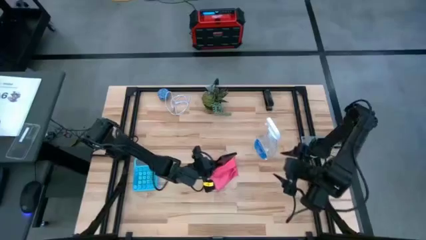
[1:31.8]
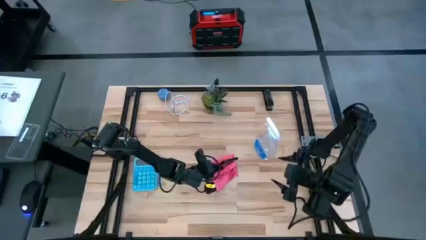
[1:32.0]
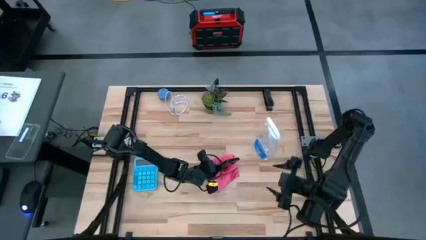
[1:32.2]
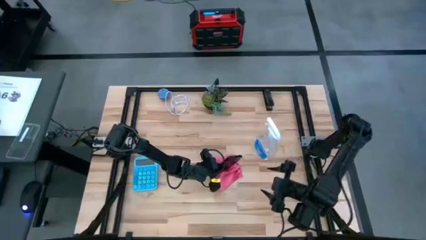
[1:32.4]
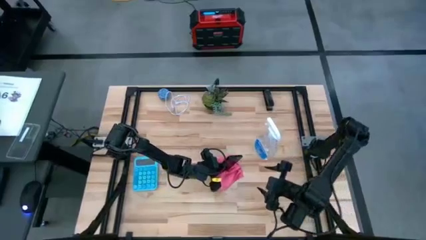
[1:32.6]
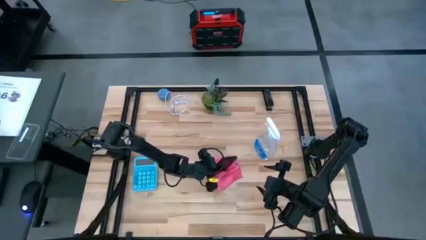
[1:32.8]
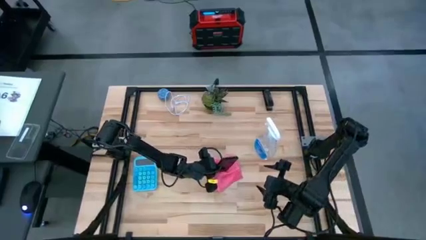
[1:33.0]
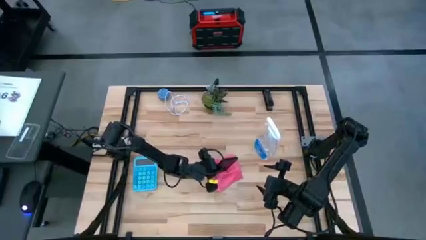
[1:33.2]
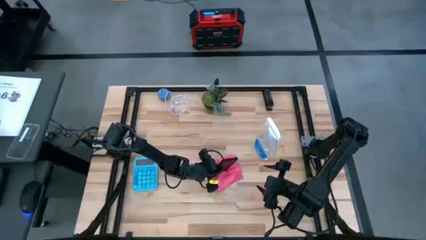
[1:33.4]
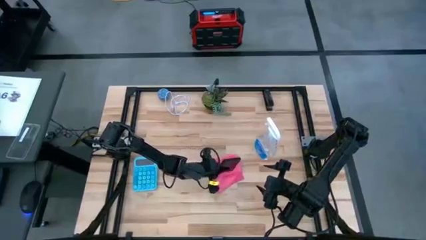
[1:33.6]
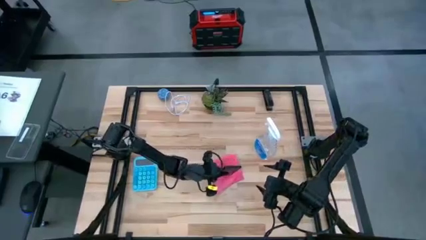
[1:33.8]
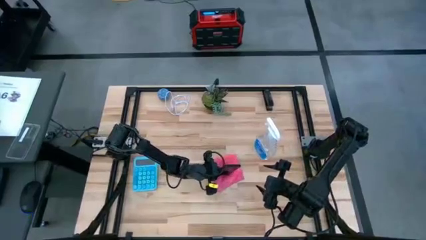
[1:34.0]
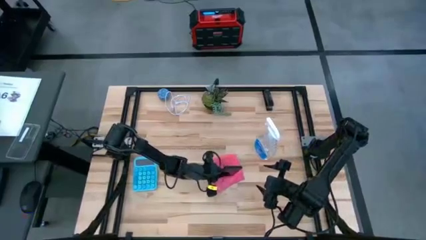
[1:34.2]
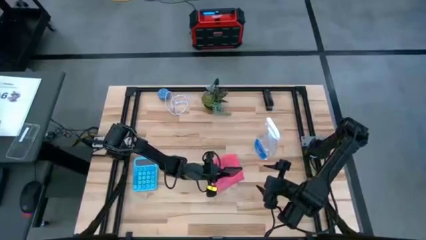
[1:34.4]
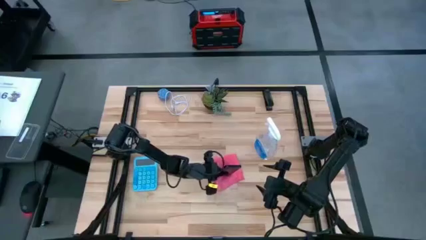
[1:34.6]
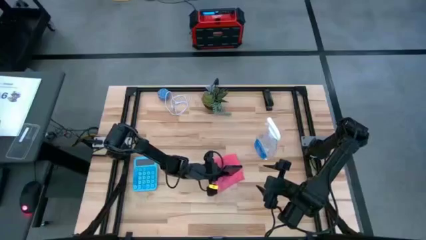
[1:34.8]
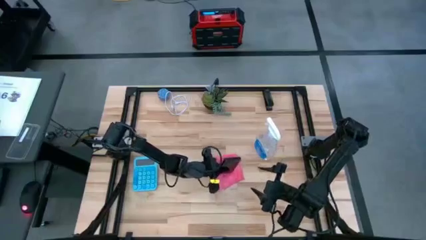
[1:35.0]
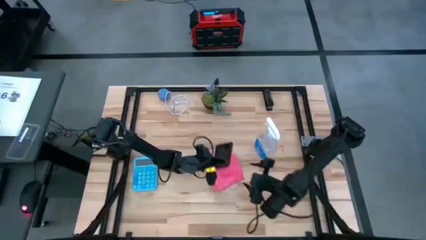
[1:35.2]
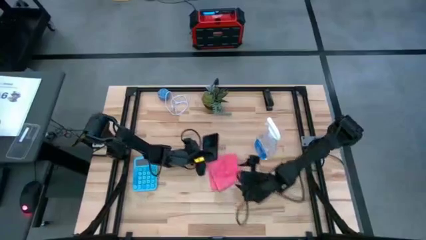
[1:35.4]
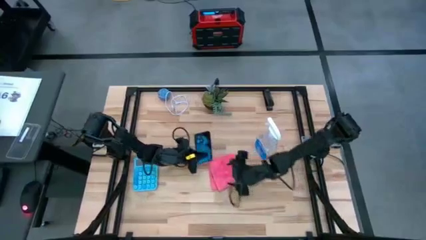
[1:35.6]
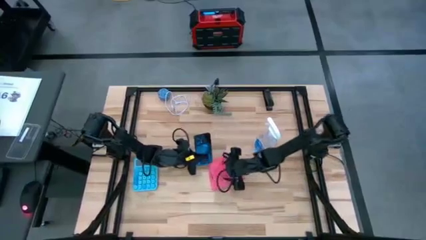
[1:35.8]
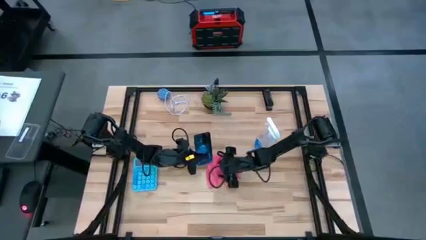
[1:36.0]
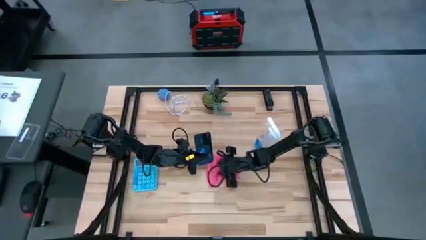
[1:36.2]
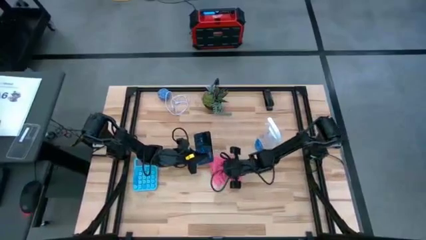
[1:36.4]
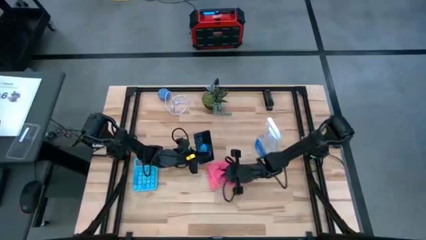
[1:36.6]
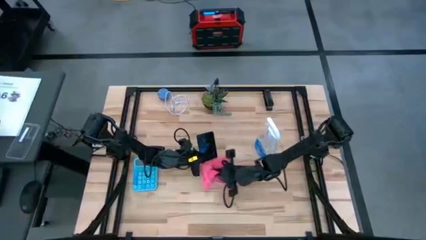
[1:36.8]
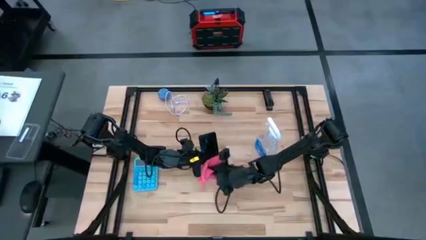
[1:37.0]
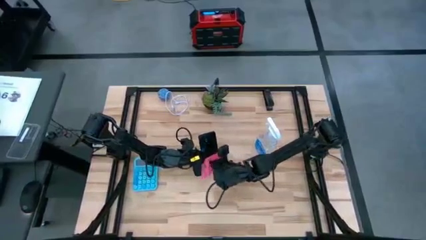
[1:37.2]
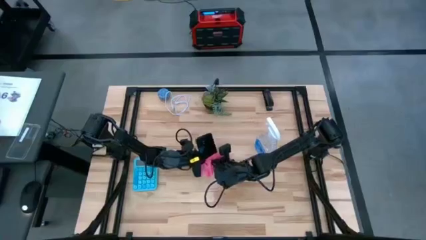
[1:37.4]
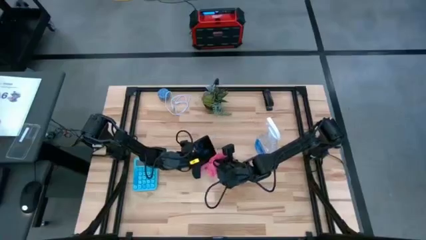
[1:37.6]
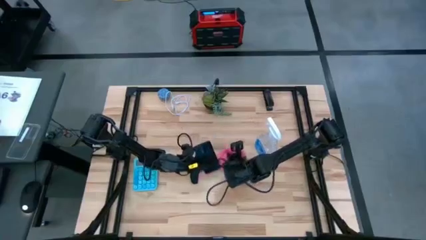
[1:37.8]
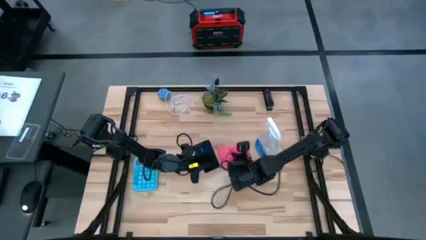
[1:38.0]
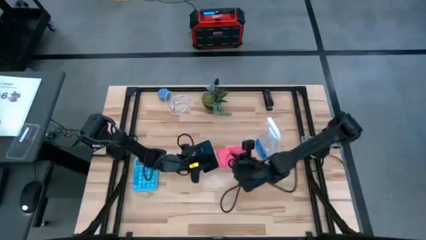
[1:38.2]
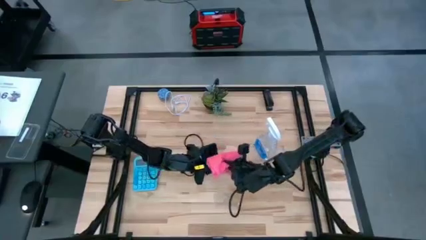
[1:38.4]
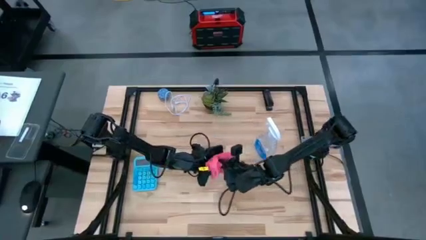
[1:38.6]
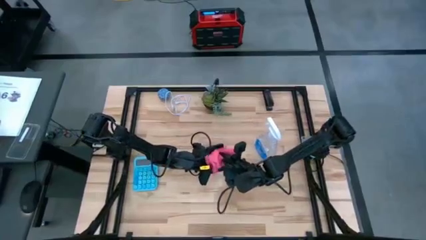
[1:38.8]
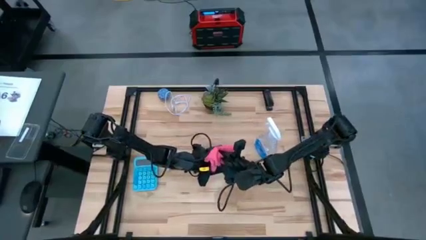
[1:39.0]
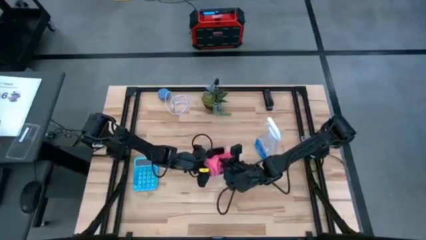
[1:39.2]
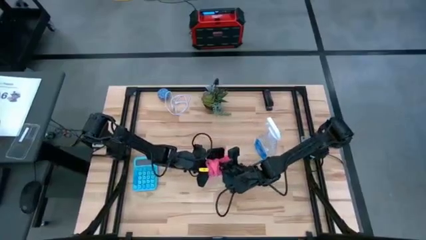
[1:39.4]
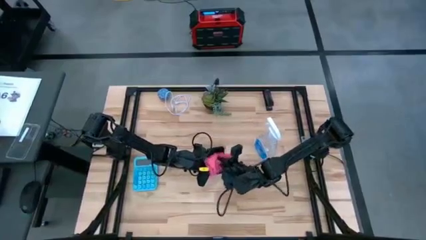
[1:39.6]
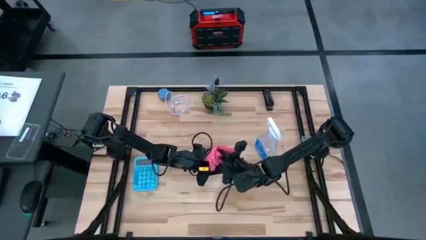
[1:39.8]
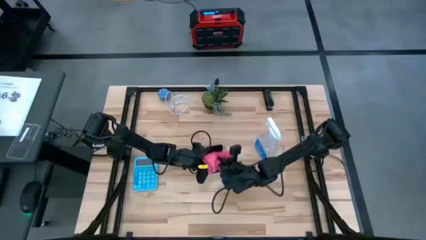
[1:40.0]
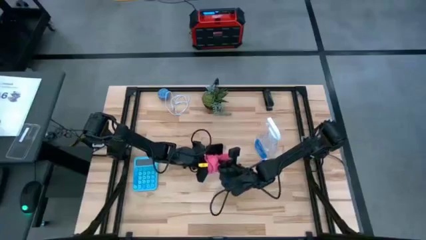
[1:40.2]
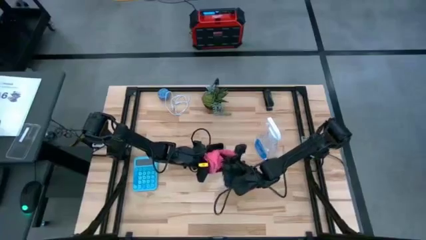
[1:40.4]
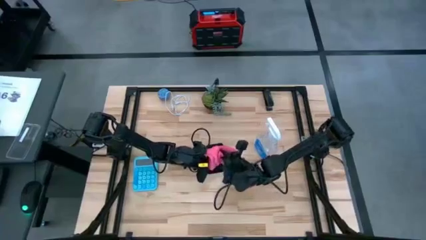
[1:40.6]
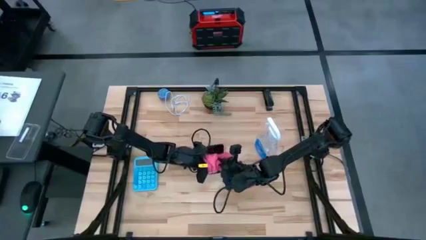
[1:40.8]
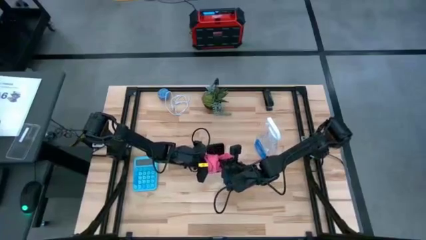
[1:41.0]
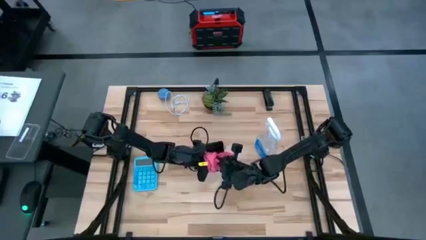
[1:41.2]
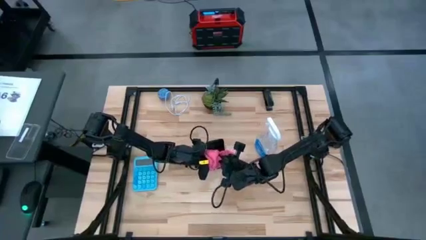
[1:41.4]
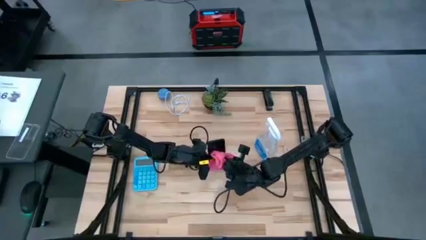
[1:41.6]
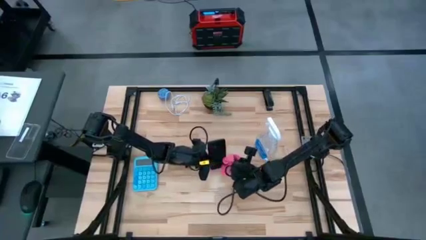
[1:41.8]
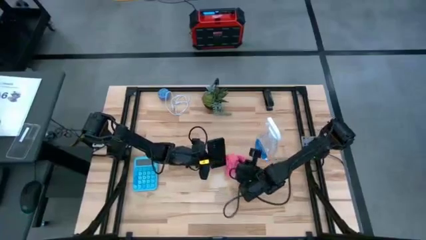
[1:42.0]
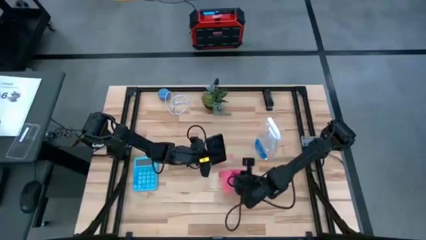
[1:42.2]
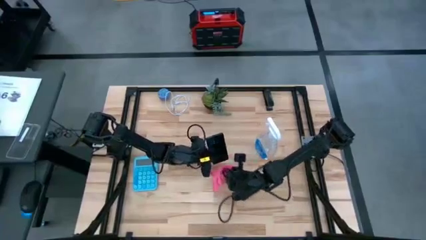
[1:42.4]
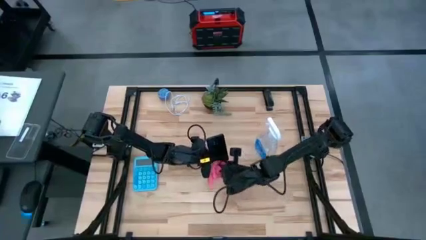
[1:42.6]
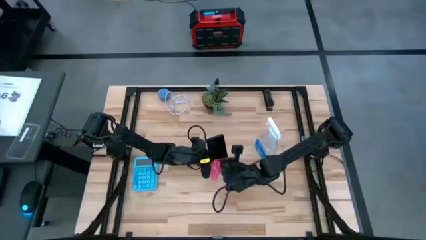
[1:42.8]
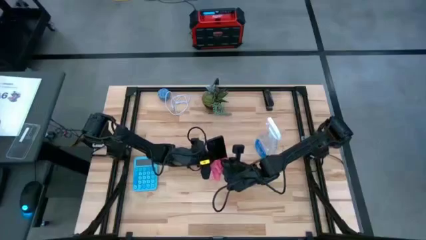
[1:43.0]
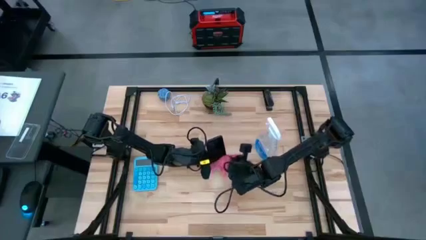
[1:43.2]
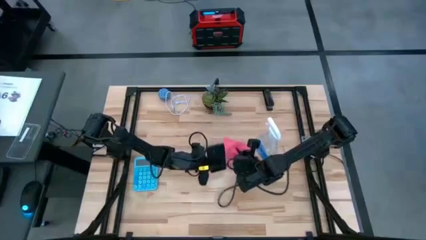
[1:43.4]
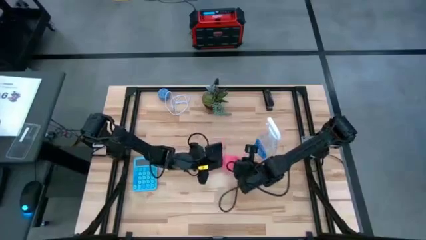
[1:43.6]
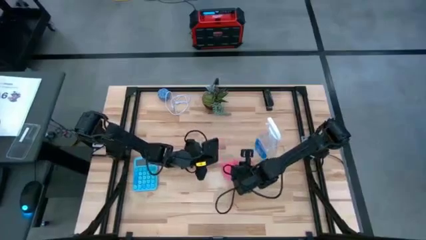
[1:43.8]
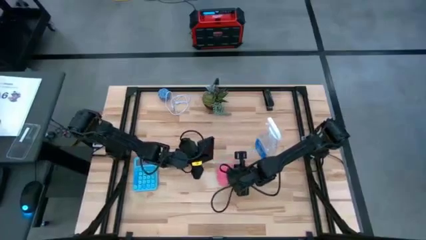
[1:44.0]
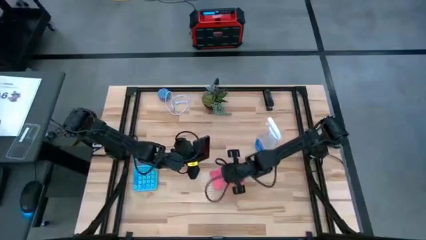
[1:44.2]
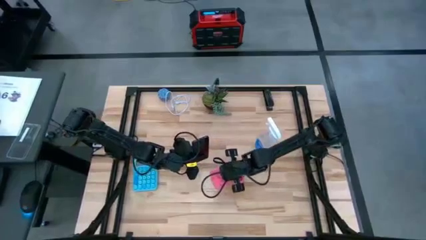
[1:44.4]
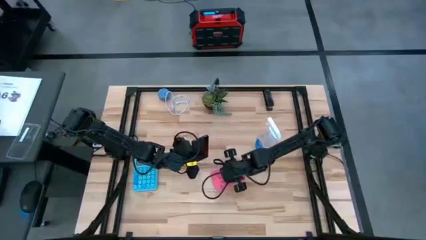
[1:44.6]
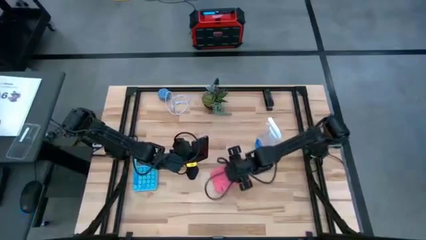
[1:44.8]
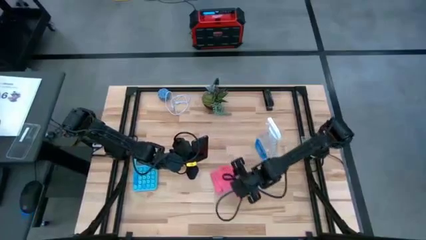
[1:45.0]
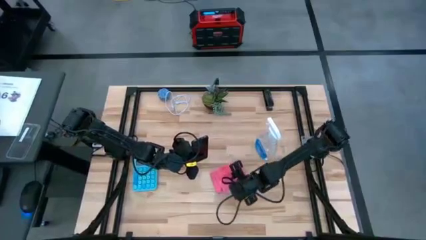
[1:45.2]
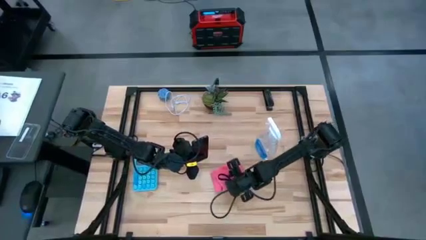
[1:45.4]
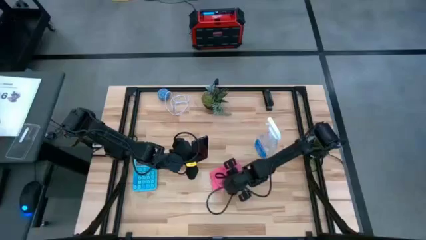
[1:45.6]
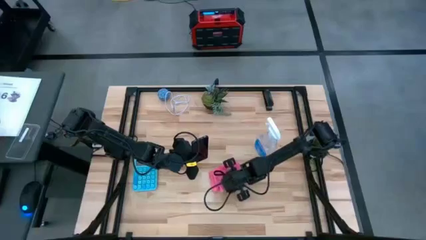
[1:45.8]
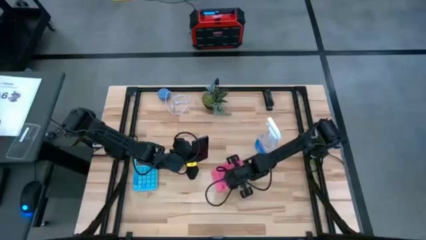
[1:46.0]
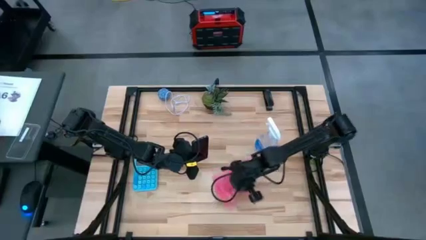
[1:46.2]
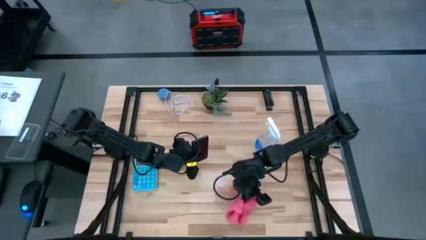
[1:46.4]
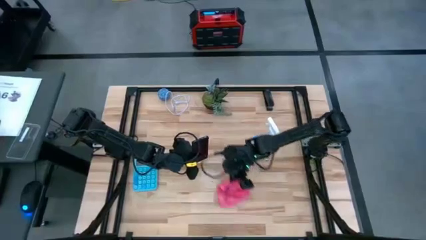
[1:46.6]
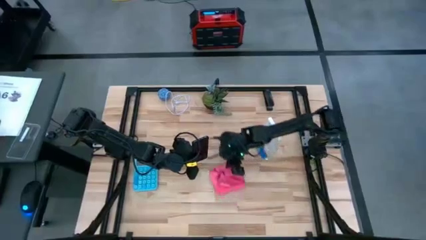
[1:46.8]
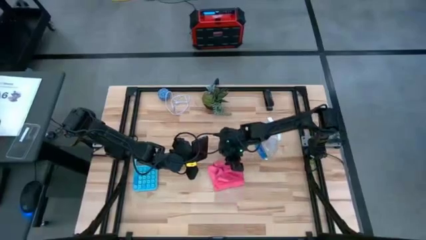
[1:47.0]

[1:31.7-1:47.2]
Task: Apply microfiber cloth
Wipe the back of the cellphone with a microfiber cloth

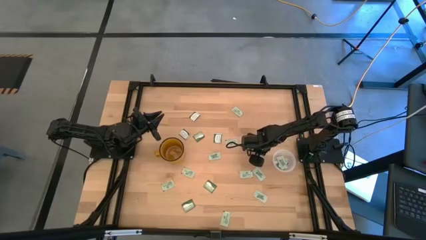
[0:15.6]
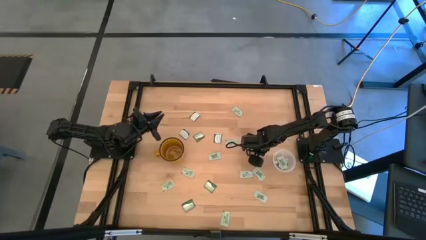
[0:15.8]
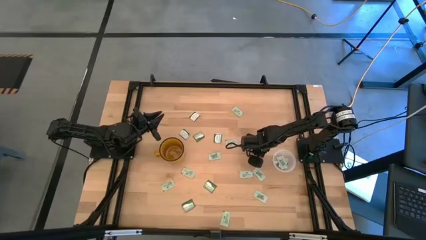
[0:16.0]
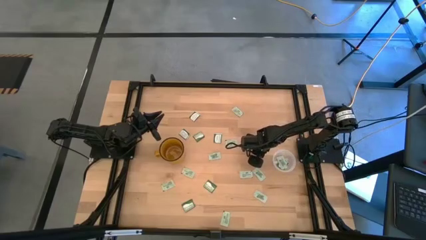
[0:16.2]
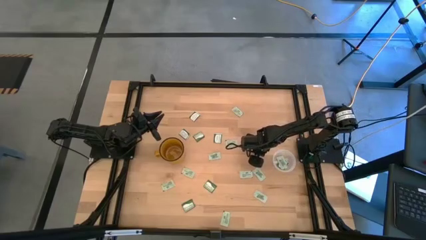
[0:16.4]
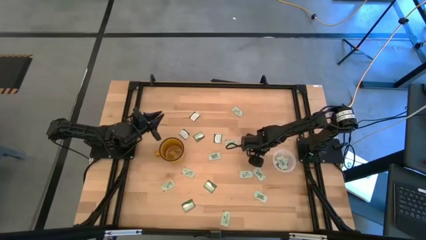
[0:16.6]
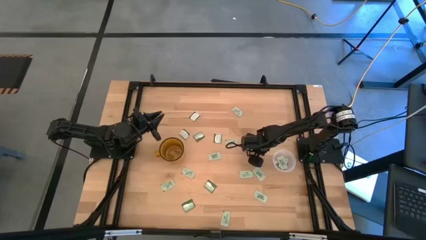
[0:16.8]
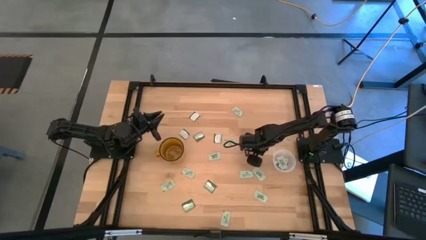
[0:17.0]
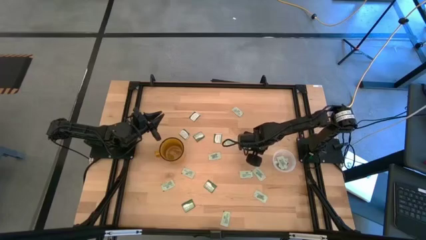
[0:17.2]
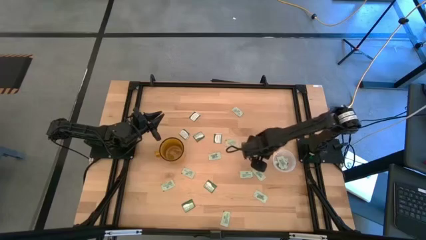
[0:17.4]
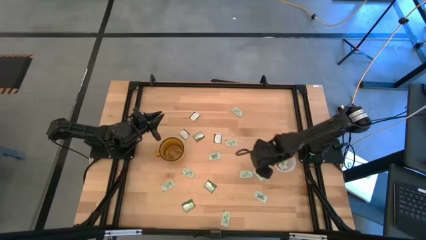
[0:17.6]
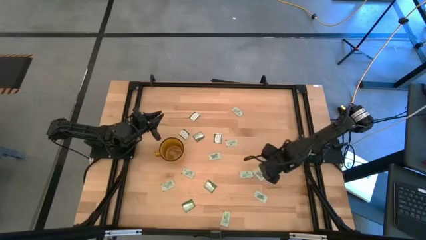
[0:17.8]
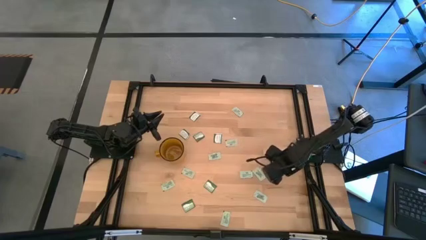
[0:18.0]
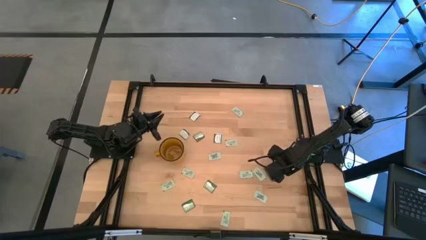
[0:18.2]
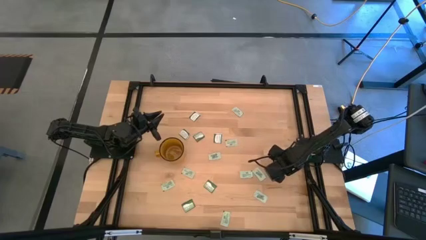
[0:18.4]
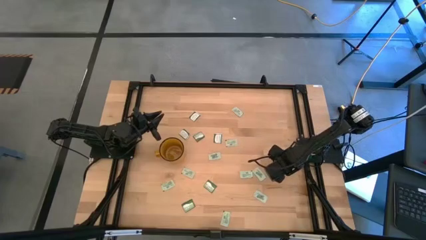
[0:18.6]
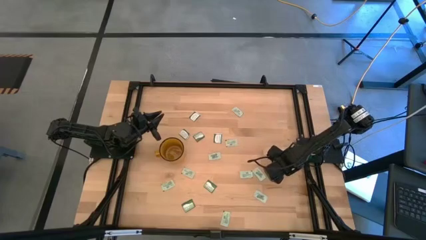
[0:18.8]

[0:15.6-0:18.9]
Task: Pick and place Stevia / Truvia into bins
Put the green stevia packet into the transparent container
